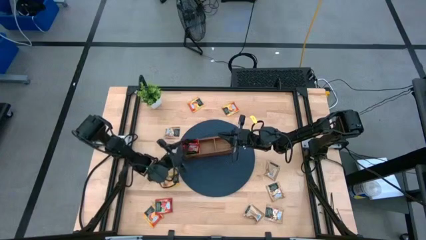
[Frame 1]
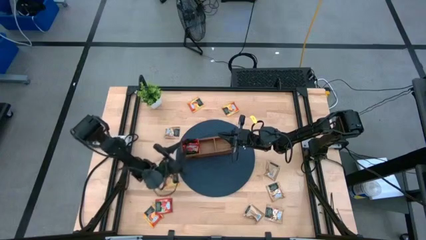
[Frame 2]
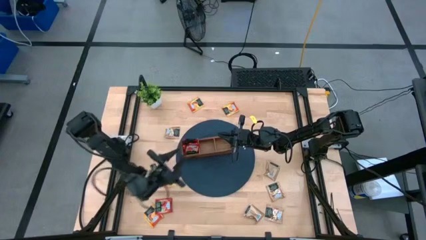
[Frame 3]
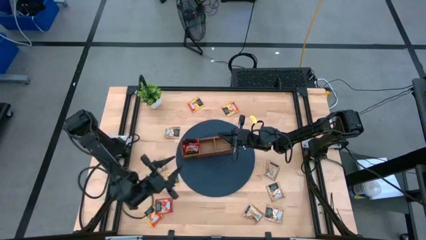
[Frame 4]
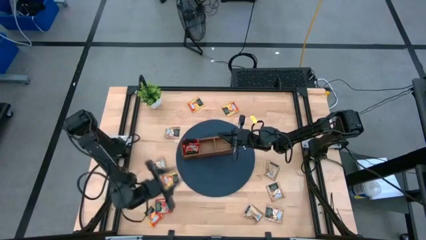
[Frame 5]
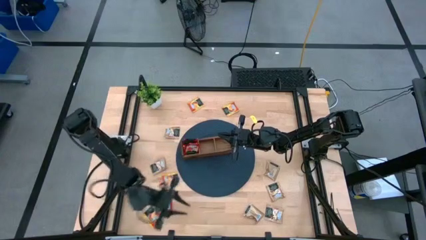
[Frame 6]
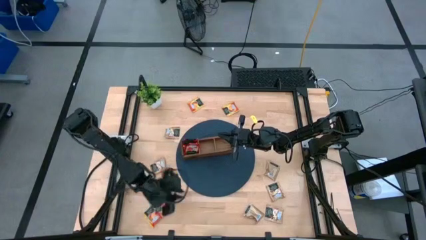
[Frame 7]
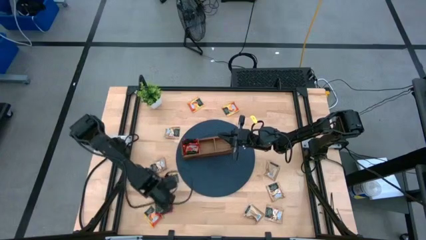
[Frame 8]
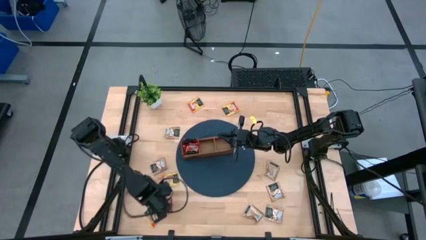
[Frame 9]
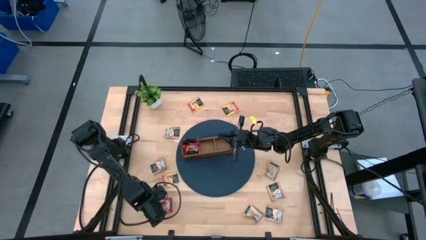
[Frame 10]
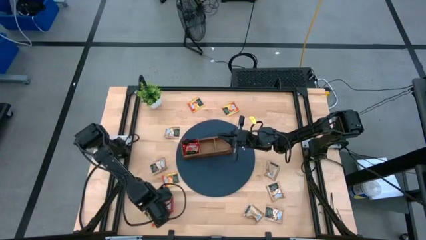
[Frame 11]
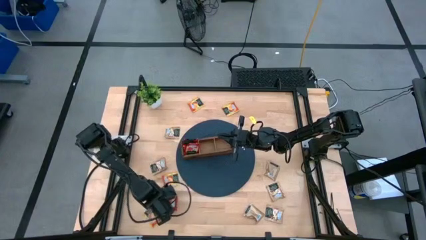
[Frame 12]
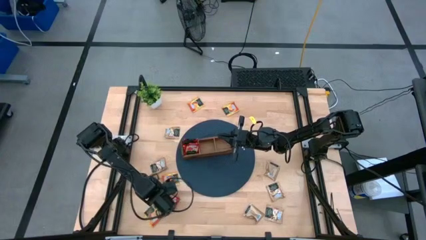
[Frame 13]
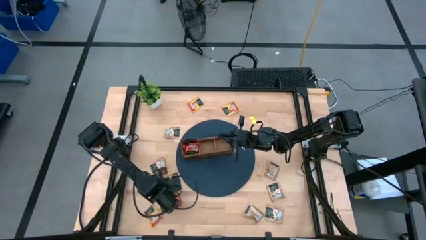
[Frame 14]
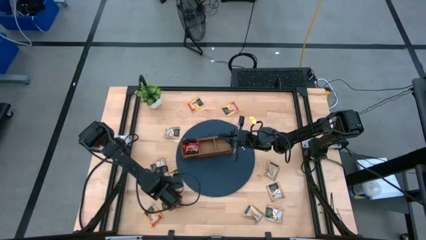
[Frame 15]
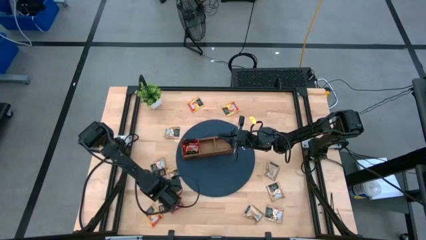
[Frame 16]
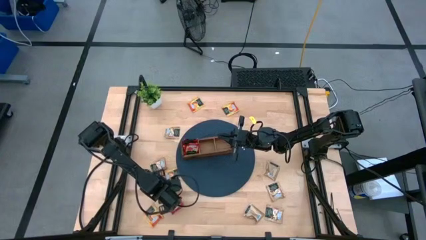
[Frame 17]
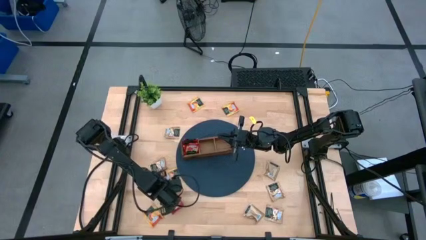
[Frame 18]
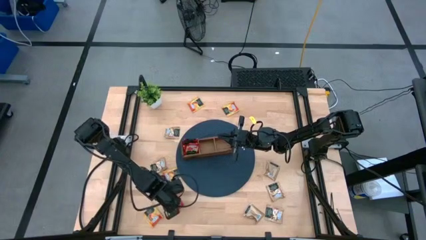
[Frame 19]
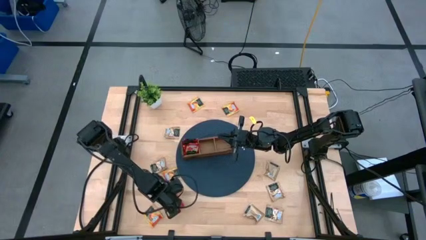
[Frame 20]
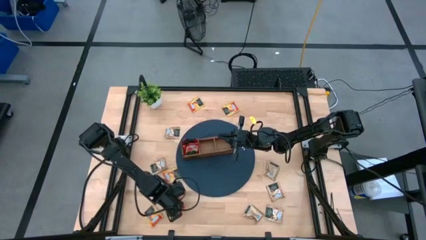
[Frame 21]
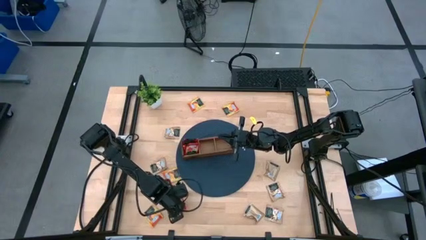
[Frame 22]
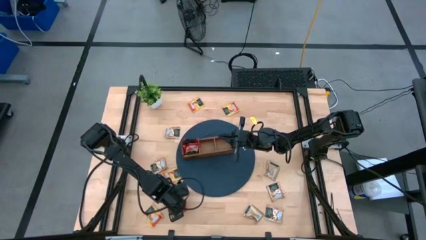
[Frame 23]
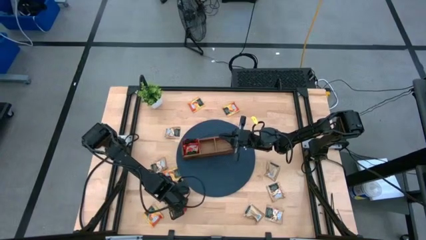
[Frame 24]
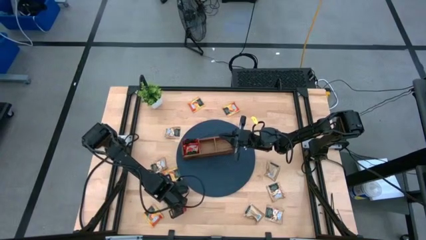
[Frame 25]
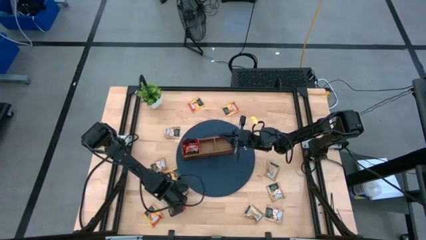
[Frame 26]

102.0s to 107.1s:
Task: Pick & Place Tea
Put the red tea bag into the left section of the wooden organizer

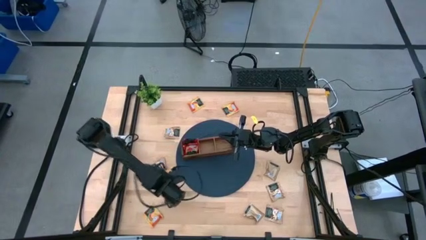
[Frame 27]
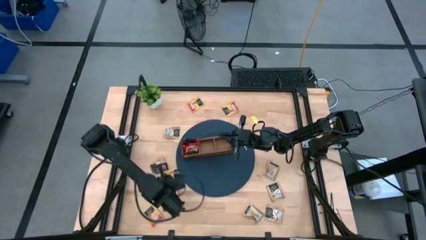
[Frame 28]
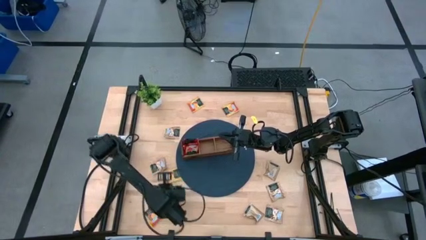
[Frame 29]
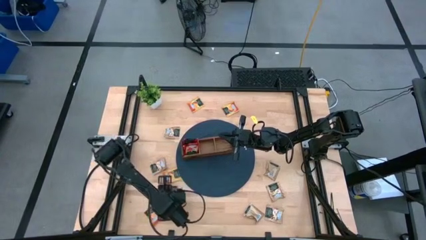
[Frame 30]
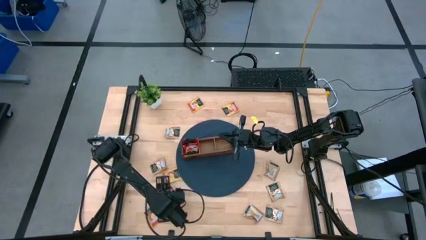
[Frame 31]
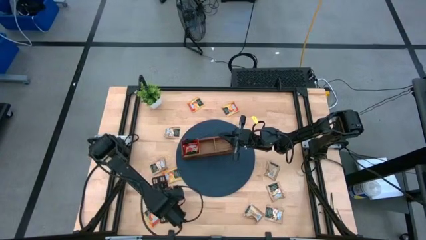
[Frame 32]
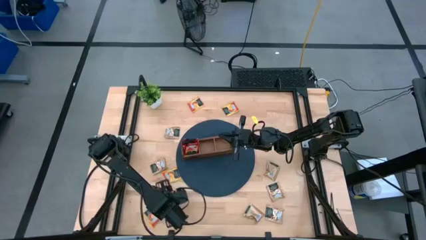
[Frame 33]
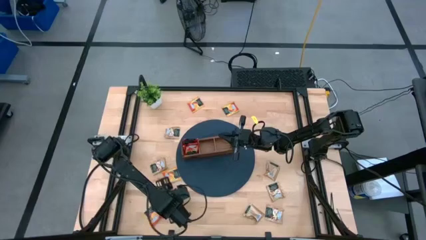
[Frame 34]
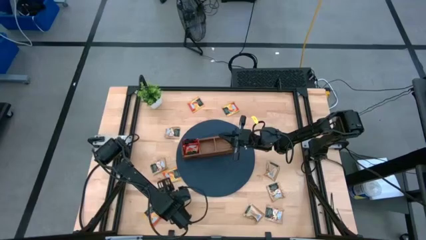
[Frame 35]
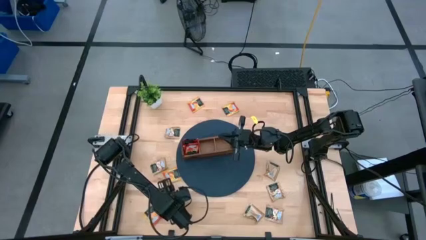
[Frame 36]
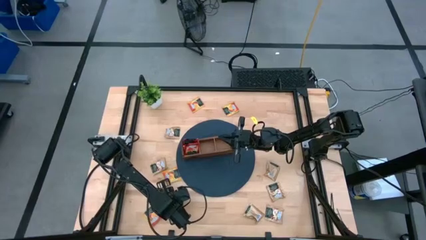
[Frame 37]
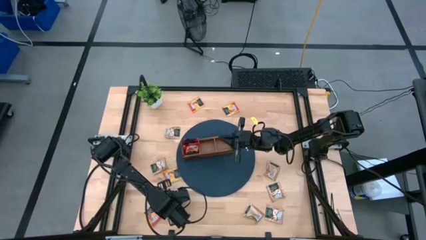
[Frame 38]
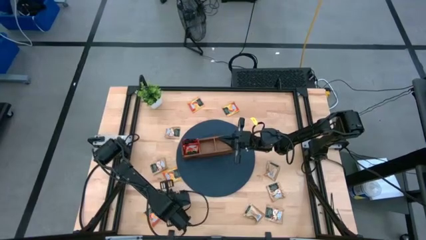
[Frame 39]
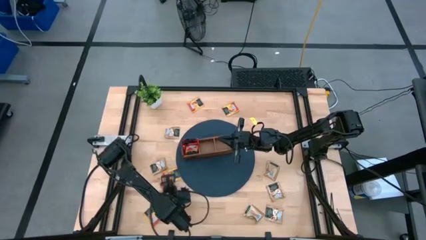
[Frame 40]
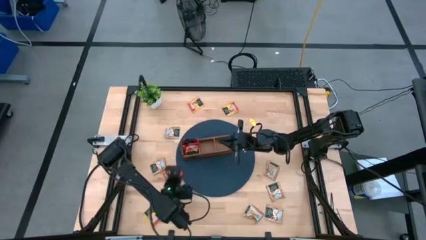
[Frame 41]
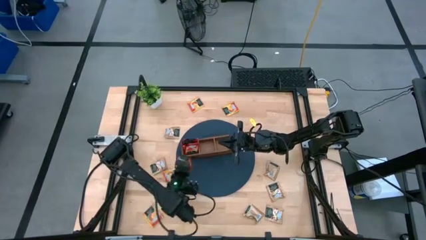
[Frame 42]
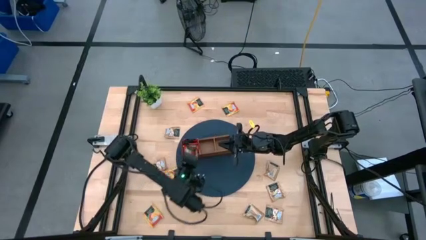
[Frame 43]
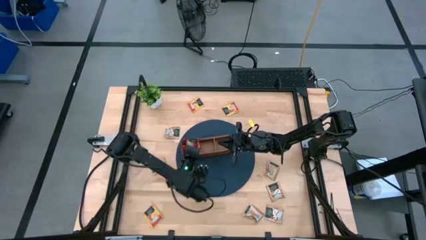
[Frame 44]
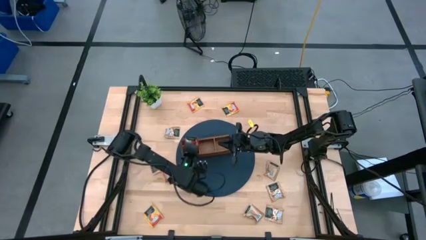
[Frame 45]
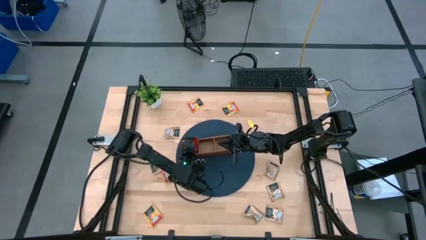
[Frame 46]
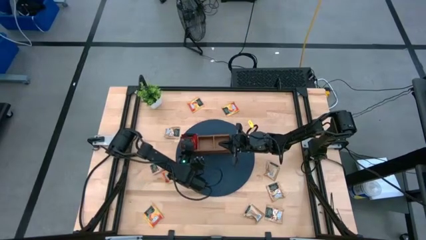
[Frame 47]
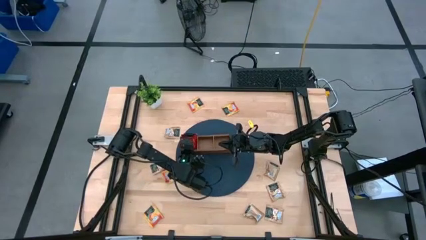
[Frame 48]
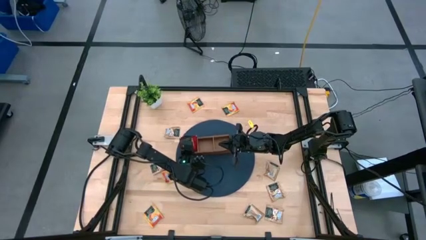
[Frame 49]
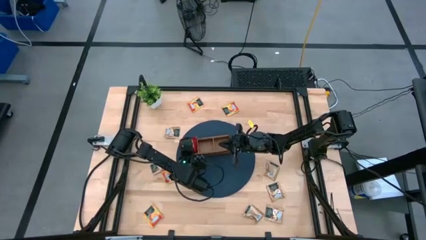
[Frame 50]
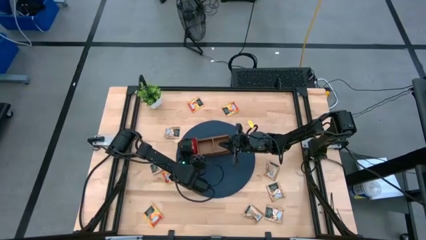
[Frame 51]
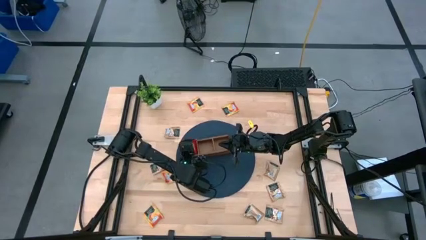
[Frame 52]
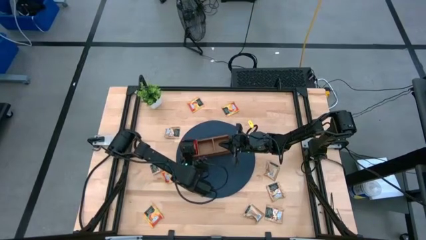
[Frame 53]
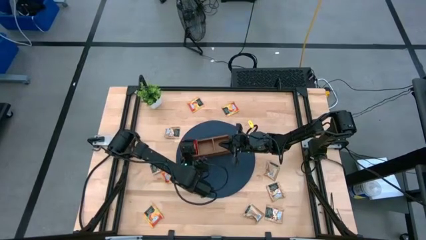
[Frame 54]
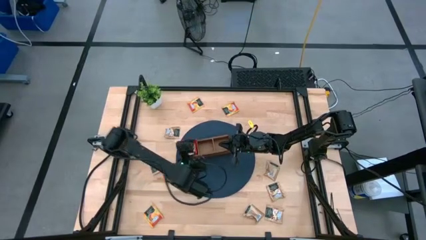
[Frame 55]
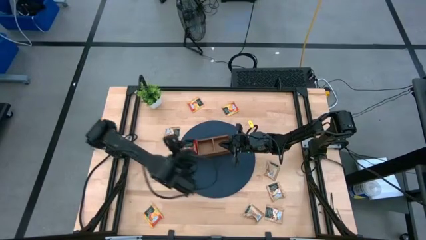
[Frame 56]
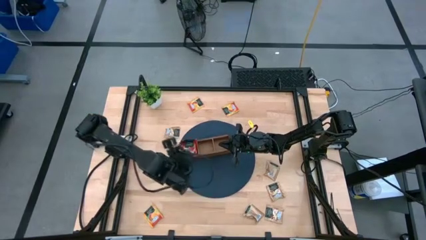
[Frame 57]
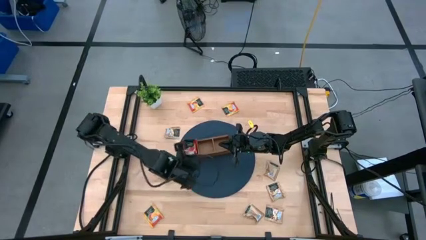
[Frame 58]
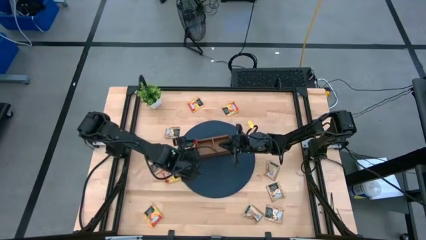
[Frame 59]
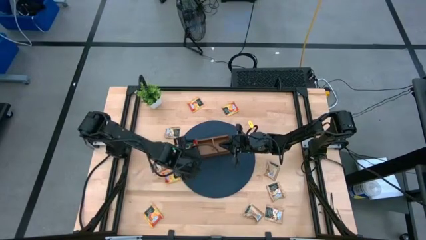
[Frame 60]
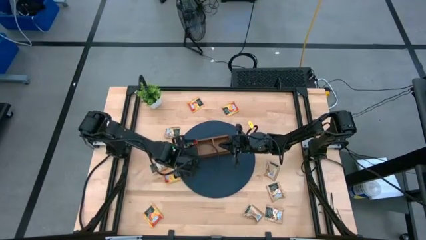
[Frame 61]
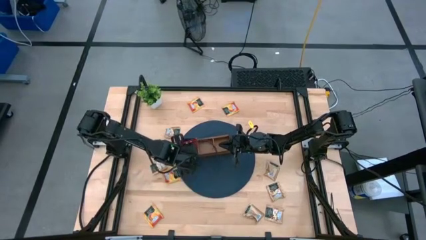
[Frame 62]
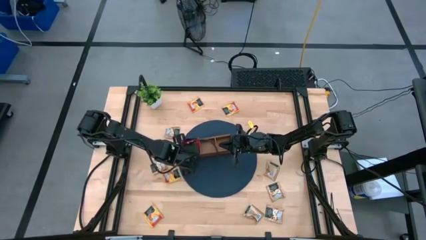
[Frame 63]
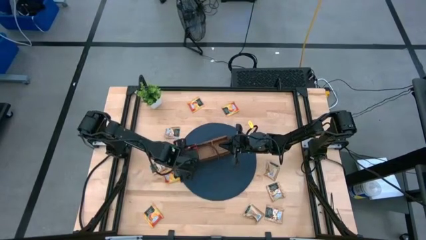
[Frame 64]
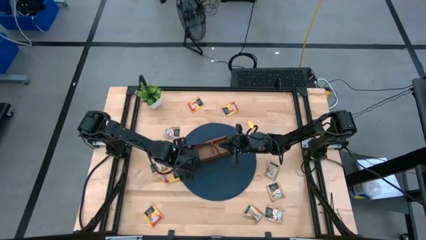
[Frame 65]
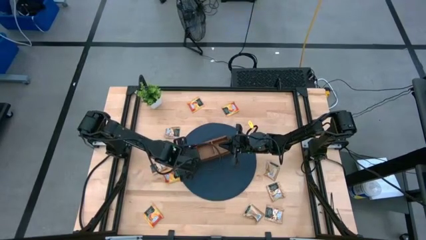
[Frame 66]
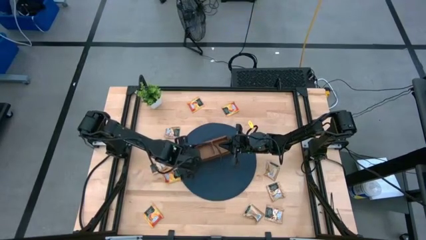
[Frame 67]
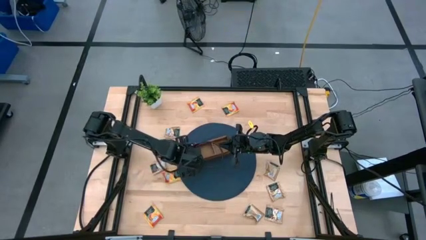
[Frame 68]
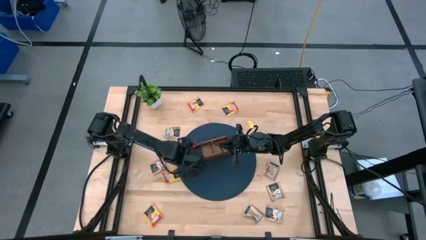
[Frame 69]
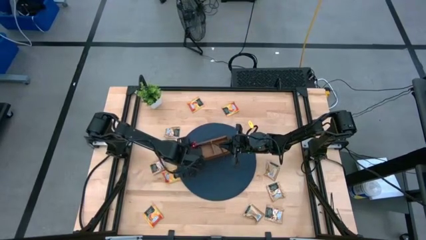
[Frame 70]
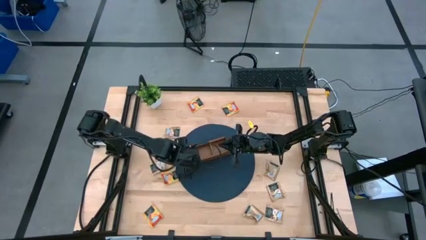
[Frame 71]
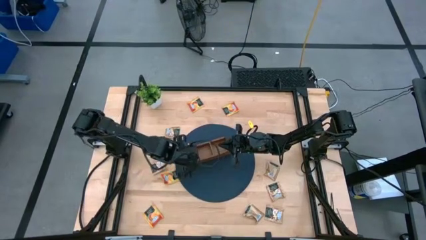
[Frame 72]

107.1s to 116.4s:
Put the red tea bag into the left section of the wooden organizer

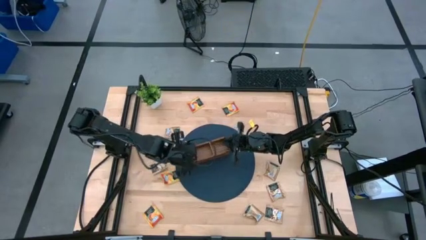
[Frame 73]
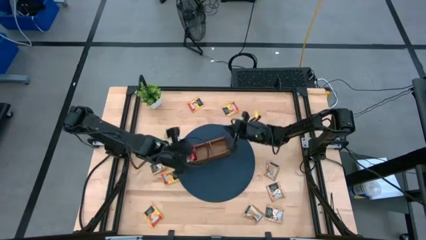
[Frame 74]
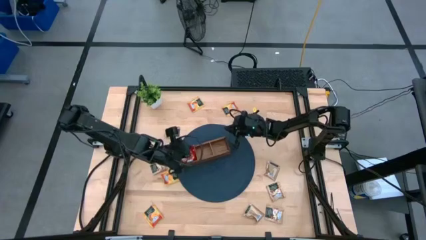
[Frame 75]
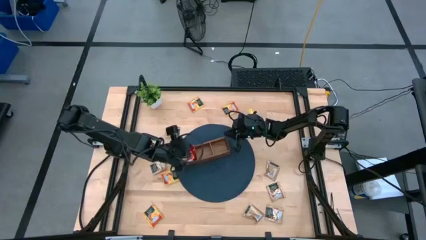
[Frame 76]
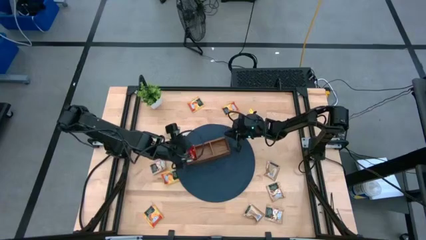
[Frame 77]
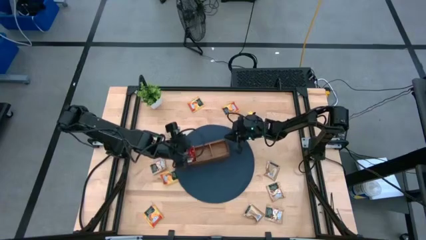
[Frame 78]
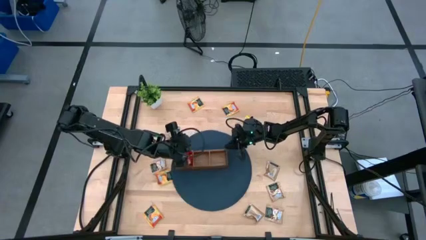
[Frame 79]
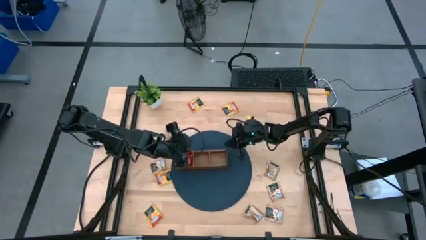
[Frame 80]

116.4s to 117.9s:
Adjust the wooden organizer
